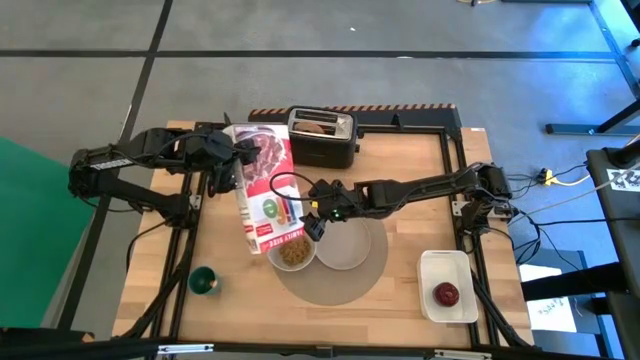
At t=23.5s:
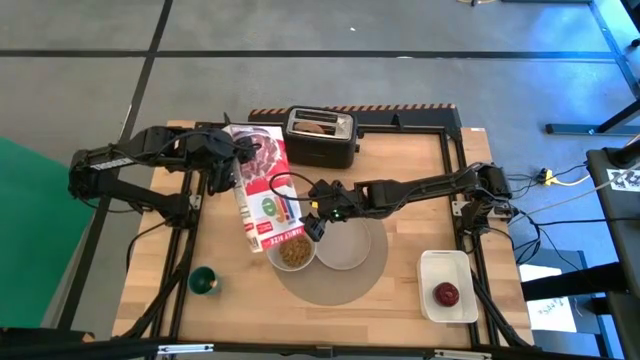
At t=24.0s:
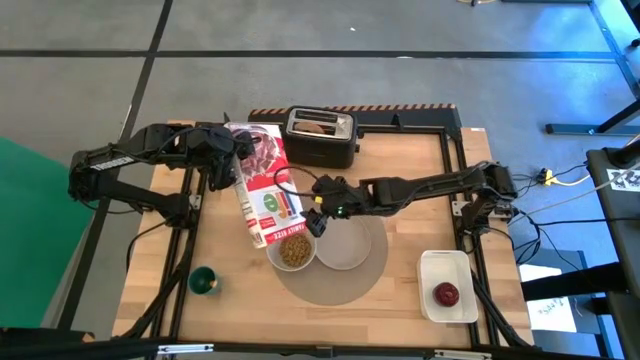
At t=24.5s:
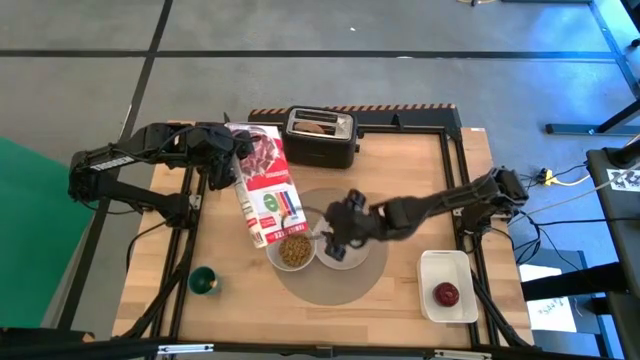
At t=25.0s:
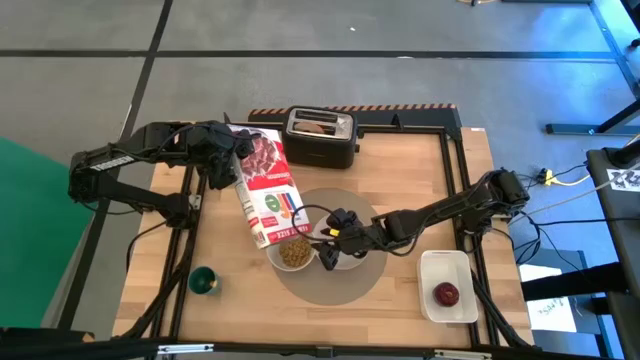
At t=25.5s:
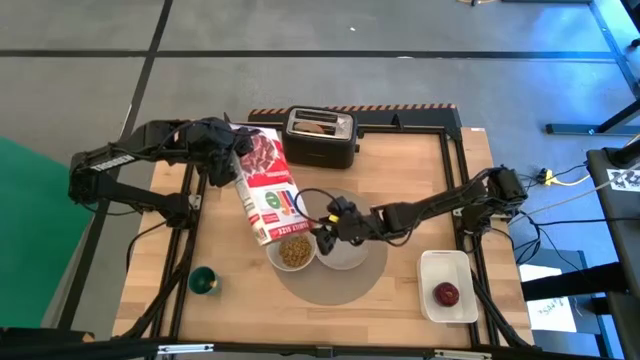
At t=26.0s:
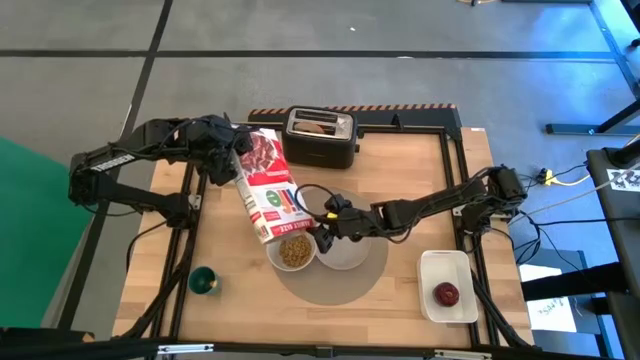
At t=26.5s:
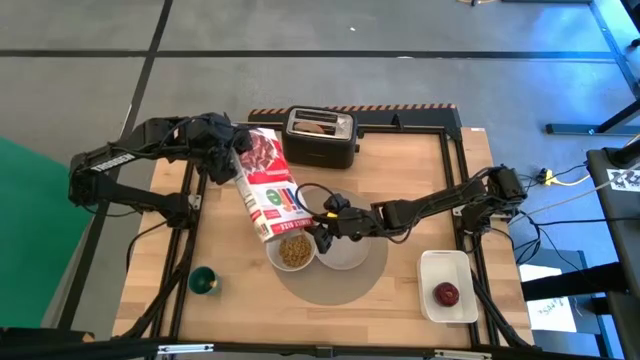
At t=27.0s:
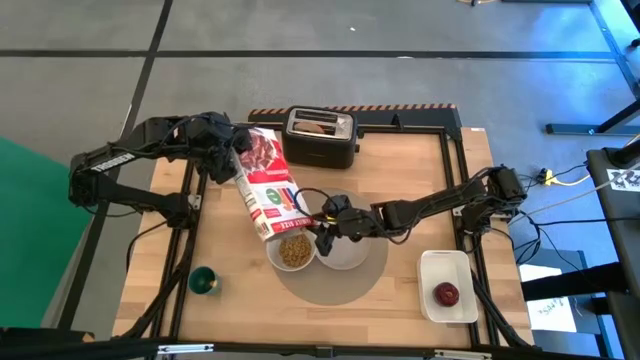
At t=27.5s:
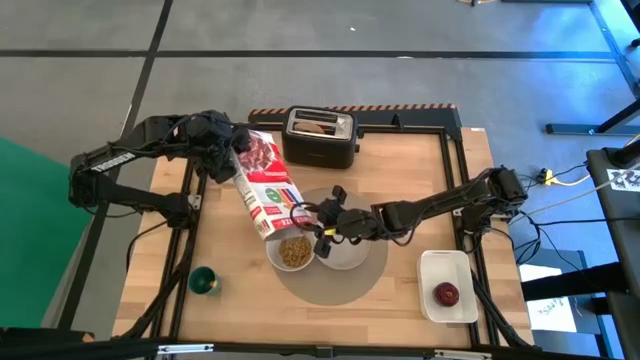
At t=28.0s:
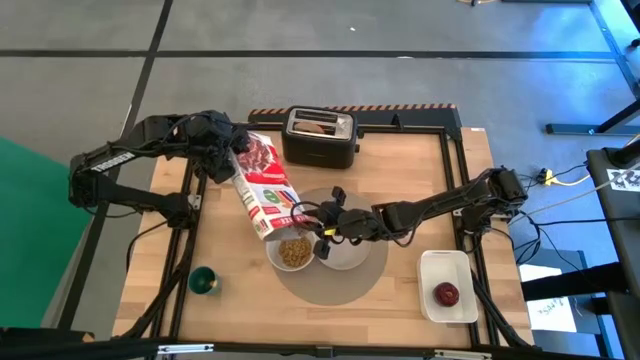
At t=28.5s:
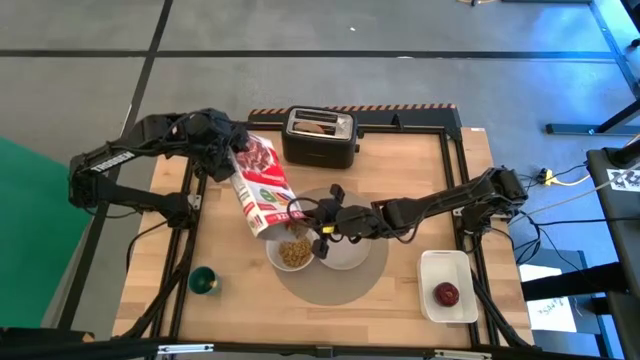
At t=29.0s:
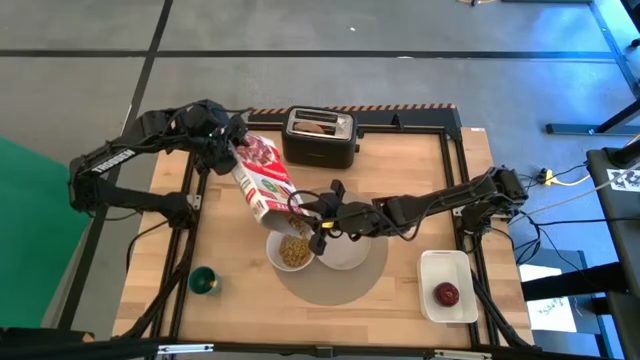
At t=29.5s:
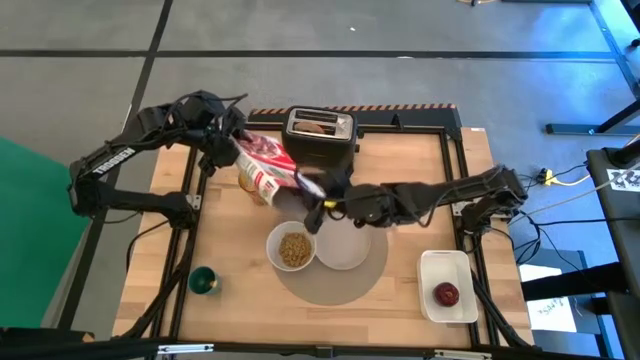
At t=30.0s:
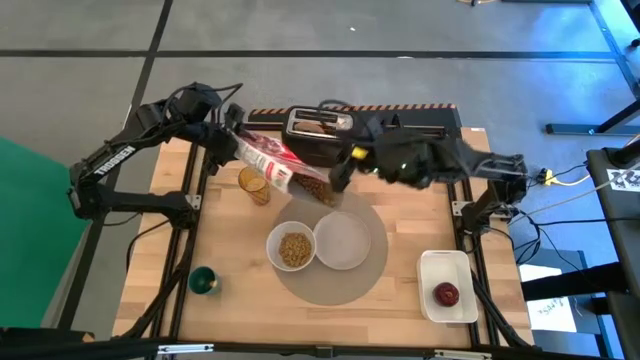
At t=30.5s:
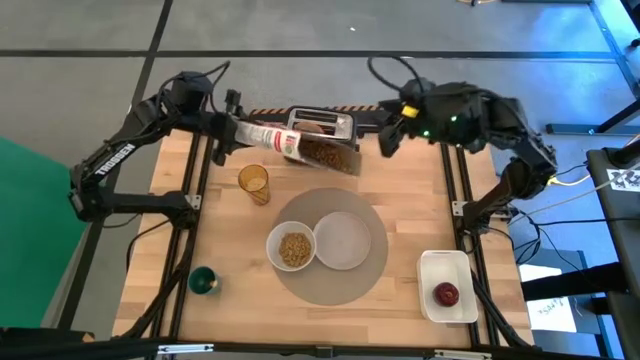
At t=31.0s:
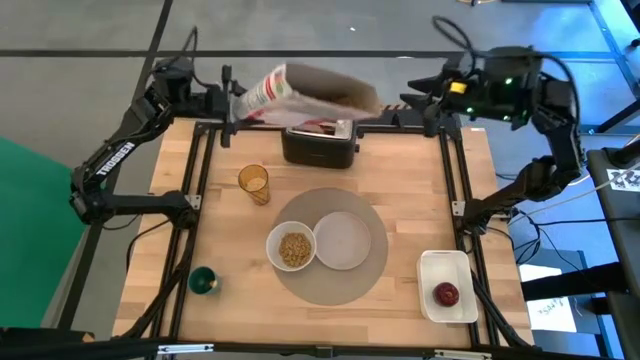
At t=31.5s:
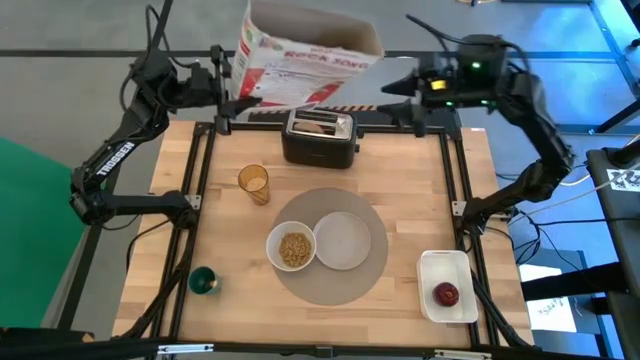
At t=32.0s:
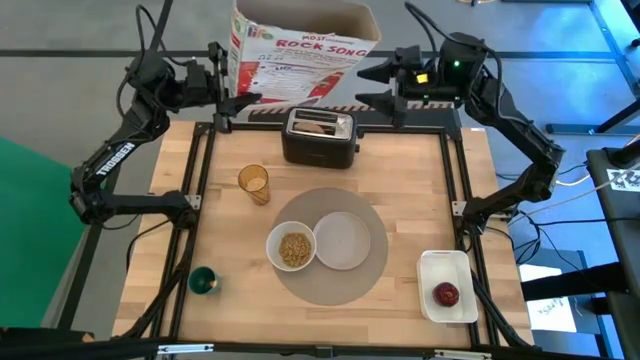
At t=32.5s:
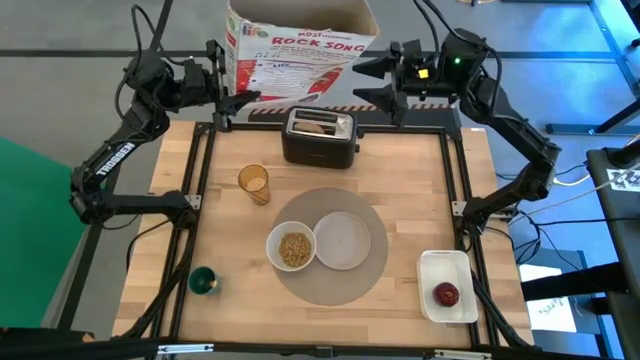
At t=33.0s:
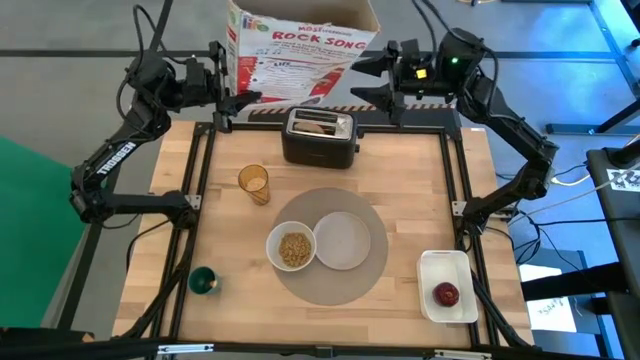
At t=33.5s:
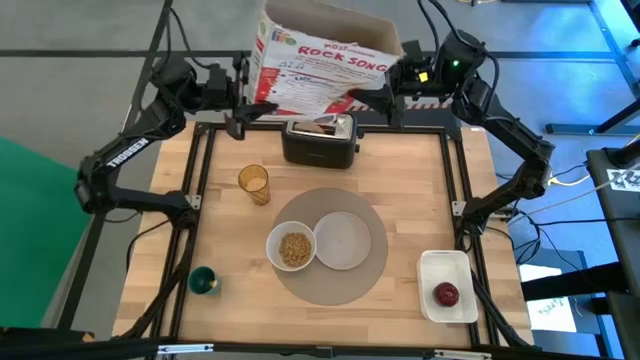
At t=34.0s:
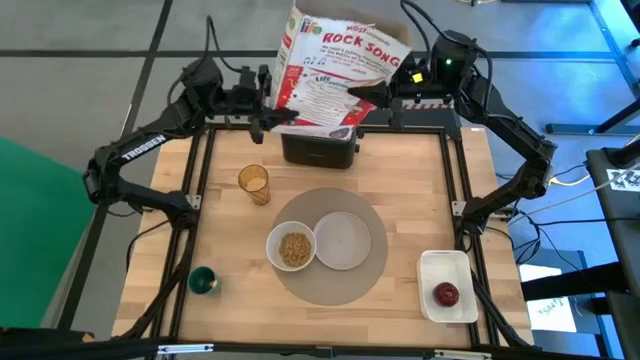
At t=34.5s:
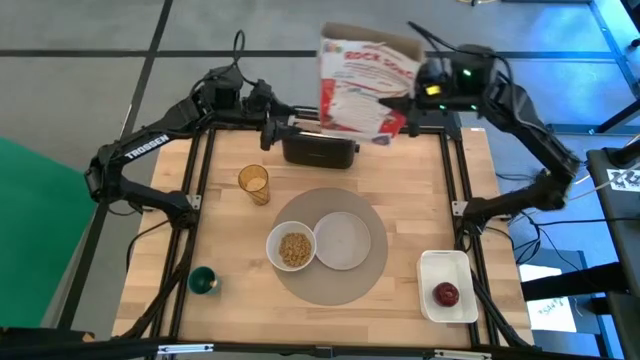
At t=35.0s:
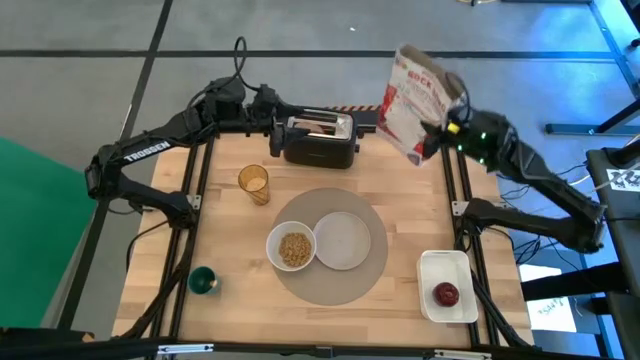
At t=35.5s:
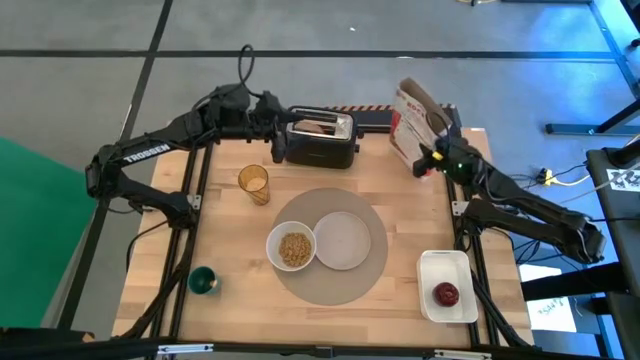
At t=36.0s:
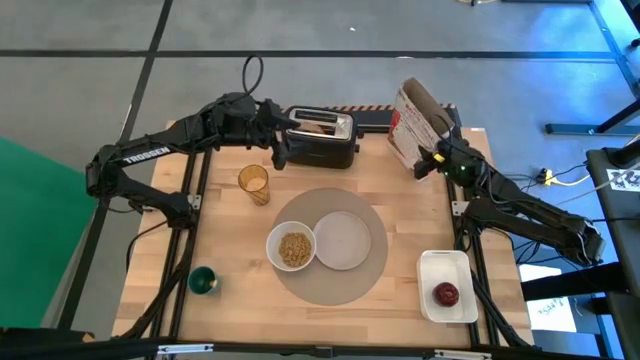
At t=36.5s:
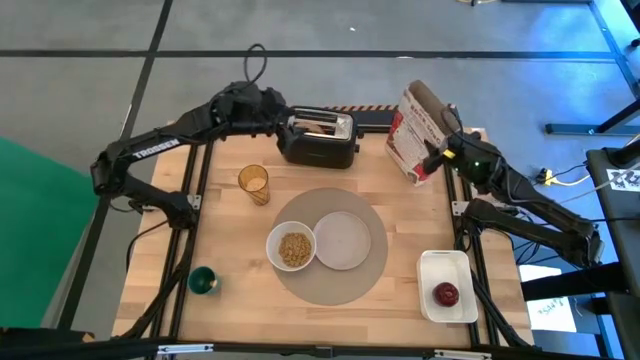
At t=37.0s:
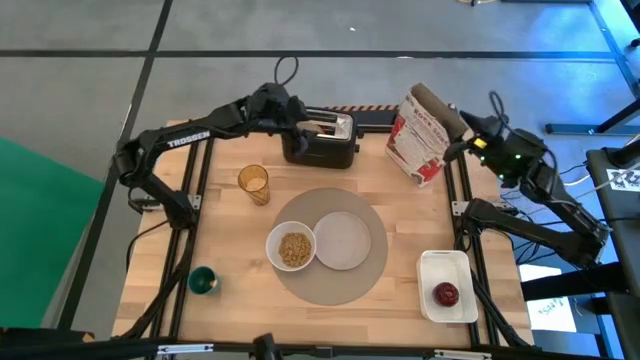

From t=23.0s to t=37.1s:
Task: Arrange a breakfast setting
Pour the cereal into the white bowl

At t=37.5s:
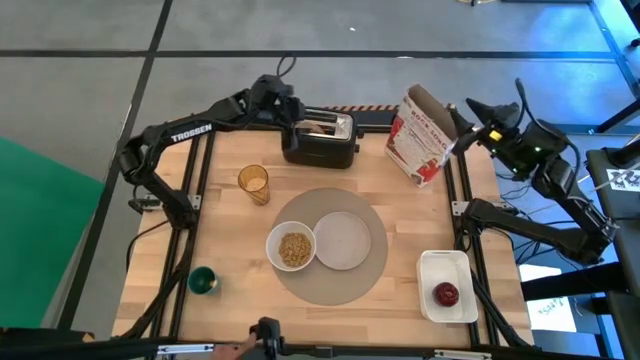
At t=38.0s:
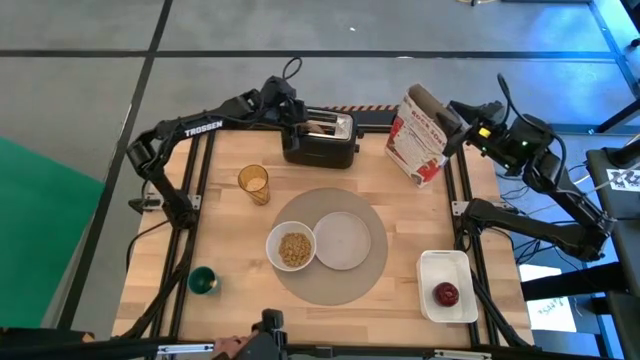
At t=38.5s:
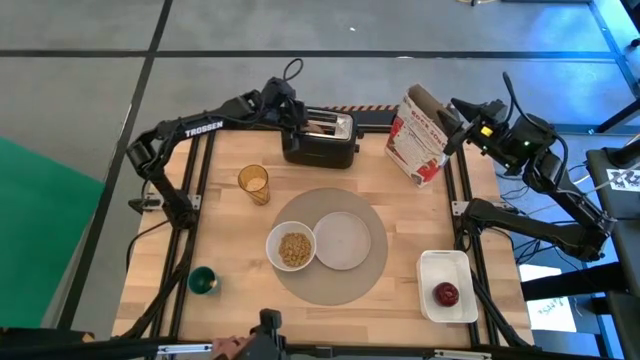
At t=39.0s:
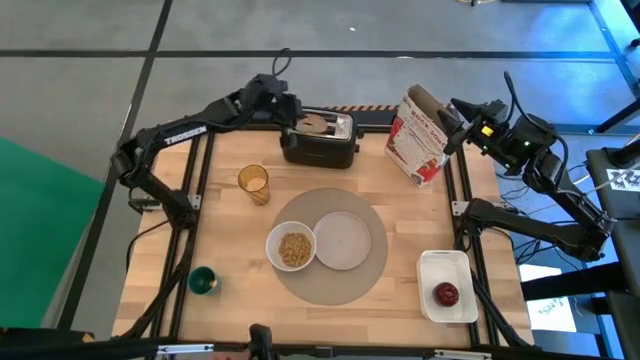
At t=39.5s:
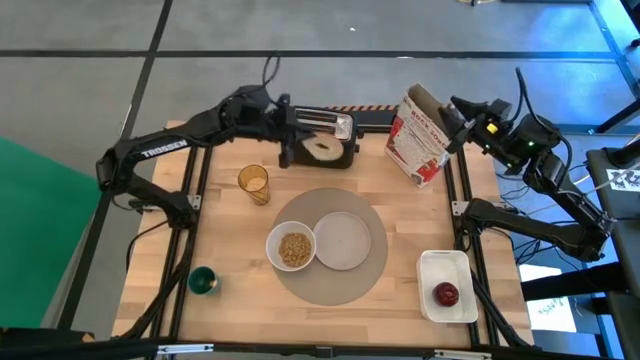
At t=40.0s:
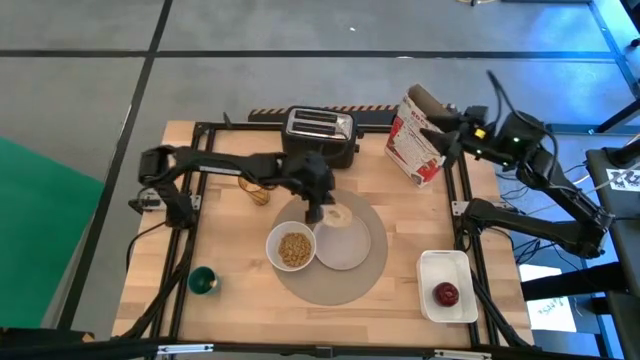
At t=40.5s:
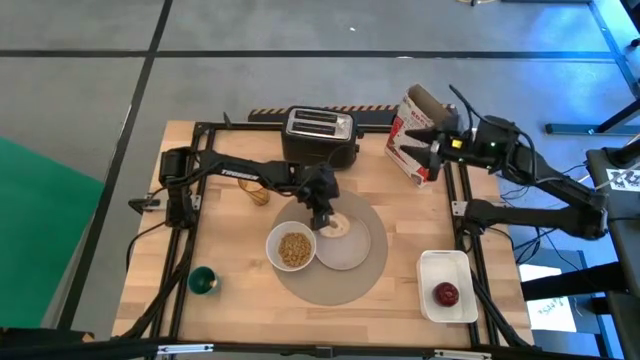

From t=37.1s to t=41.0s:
Put the bagel on the gray plate

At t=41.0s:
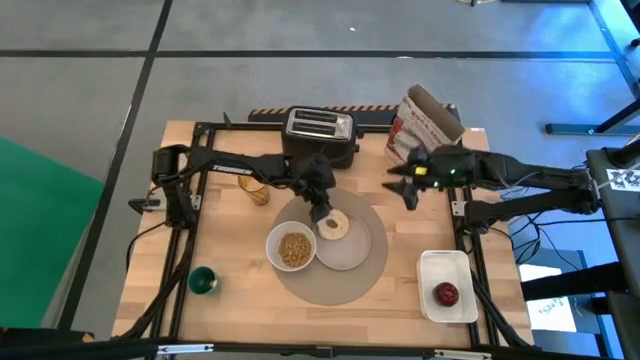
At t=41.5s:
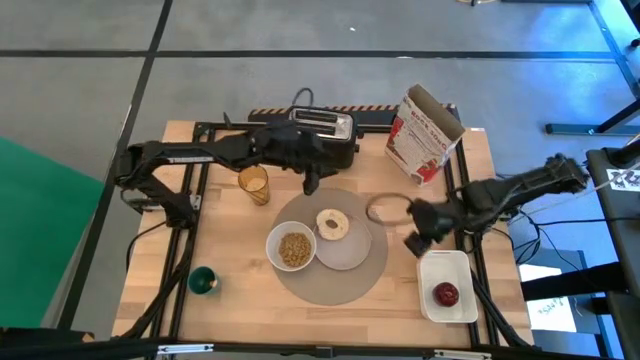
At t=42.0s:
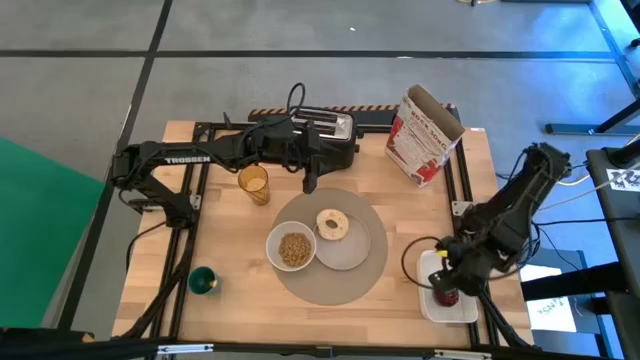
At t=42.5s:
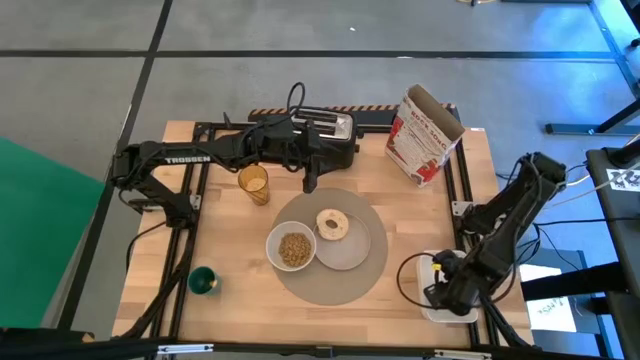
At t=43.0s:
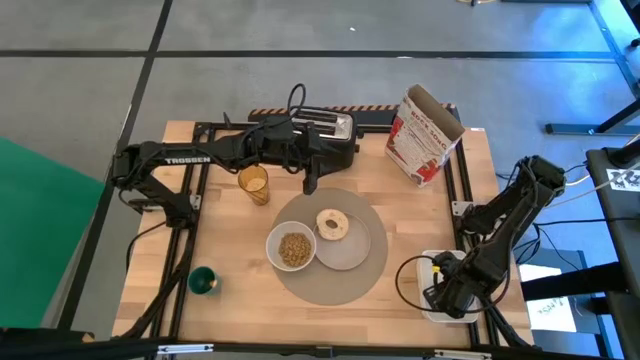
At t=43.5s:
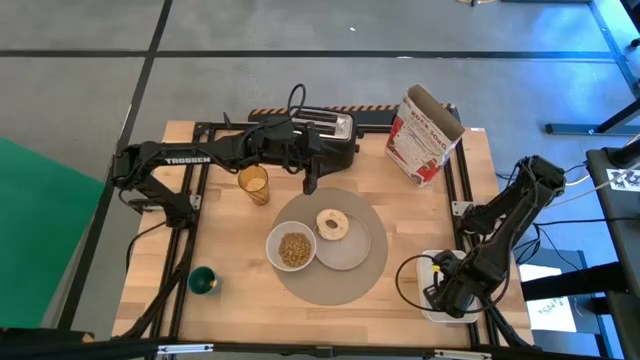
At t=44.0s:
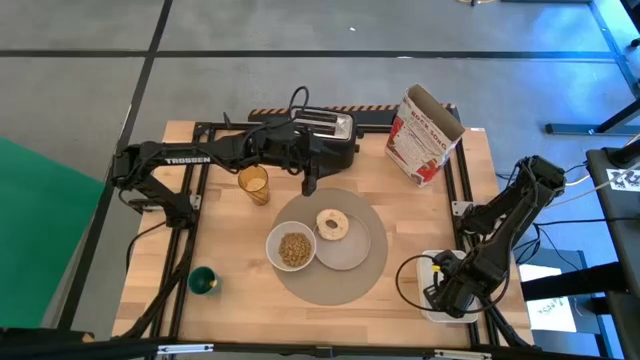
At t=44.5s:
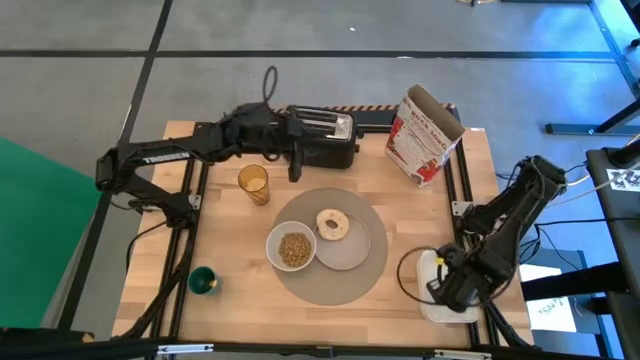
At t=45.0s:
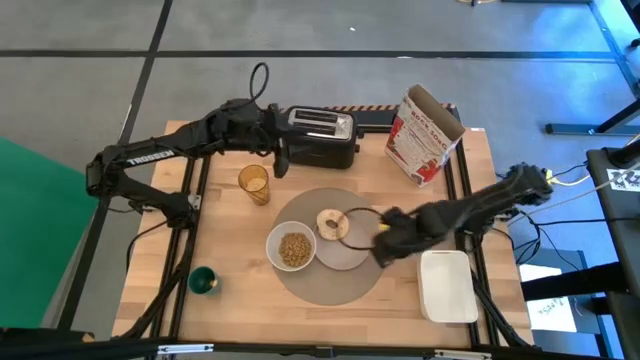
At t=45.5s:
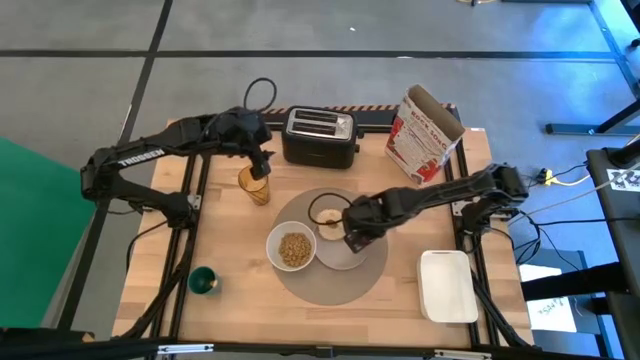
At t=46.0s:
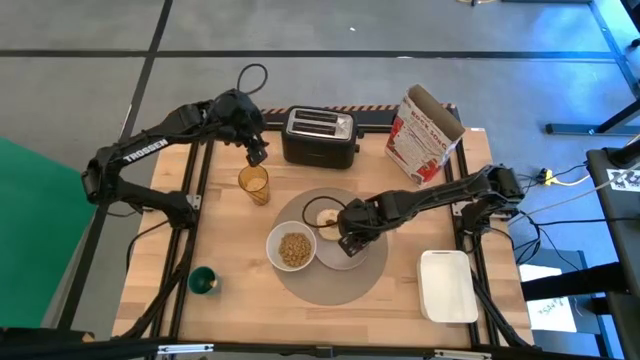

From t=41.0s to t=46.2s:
Put the apple on the gray plate
